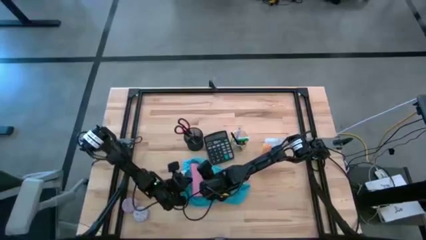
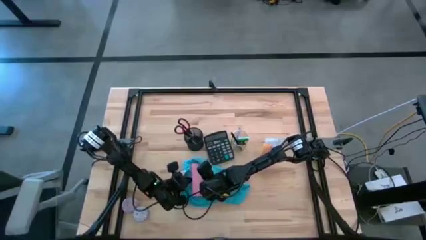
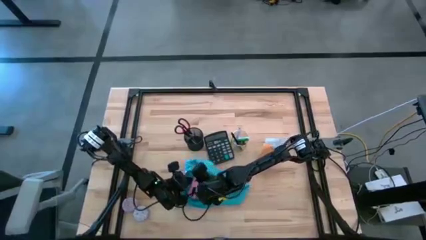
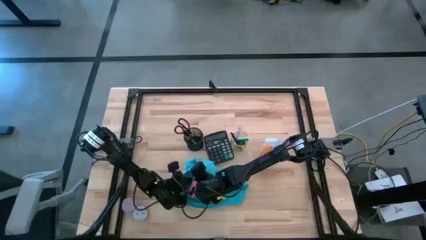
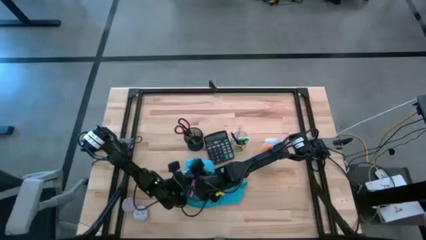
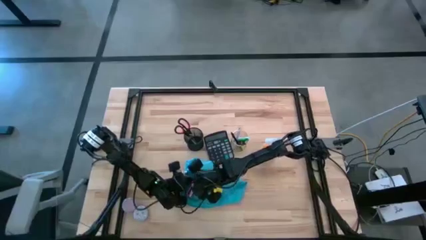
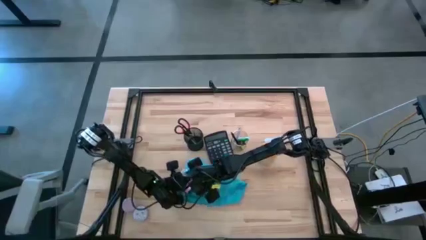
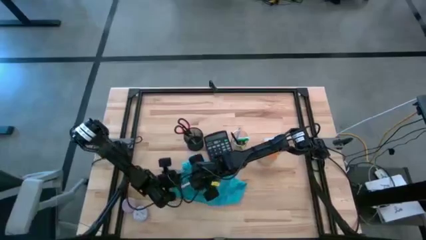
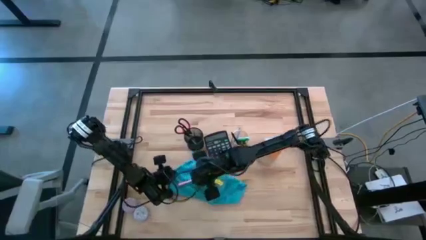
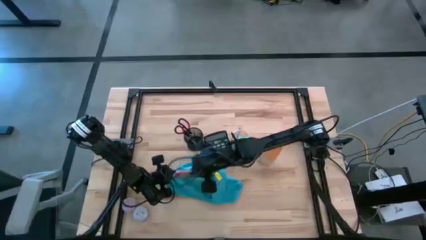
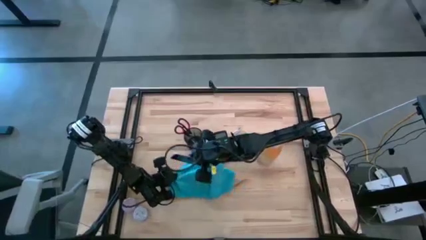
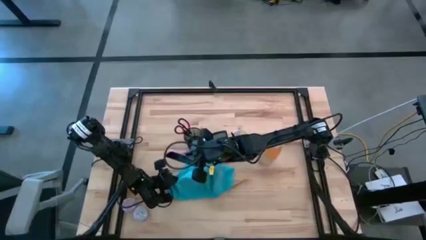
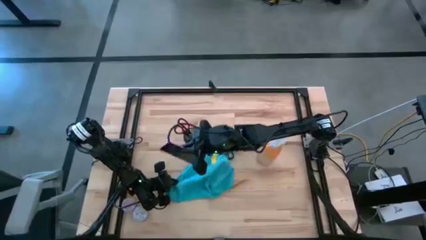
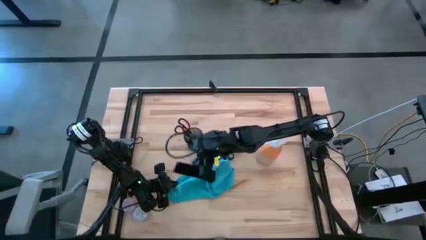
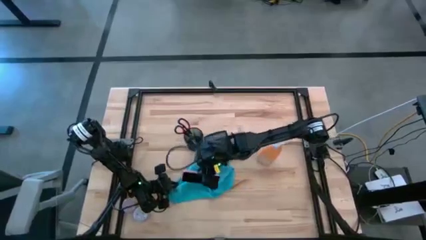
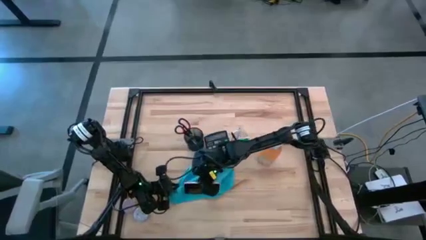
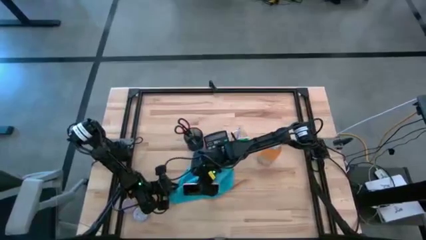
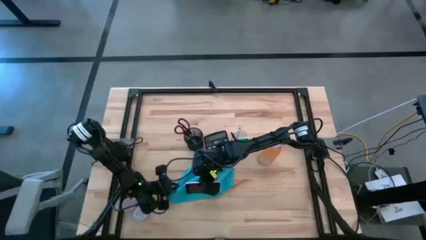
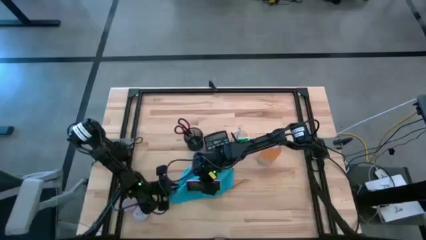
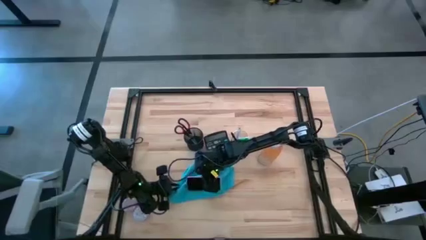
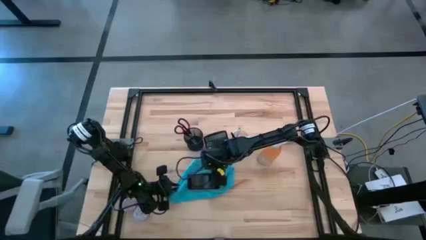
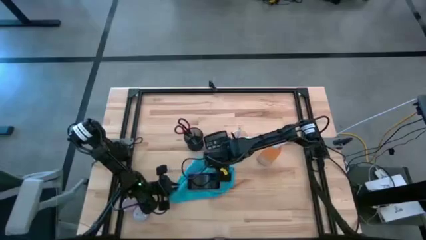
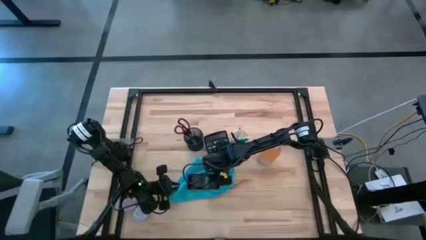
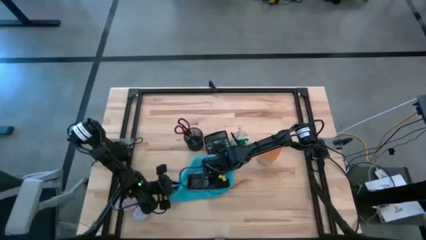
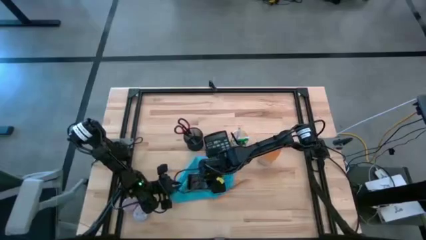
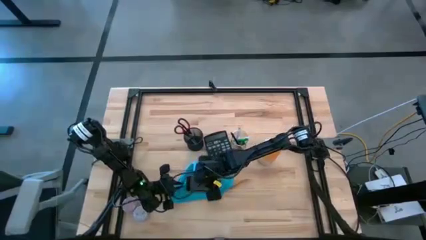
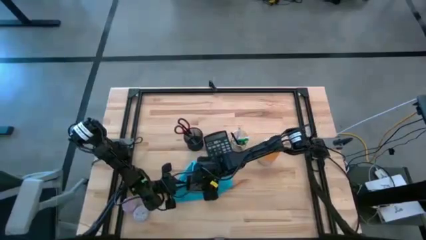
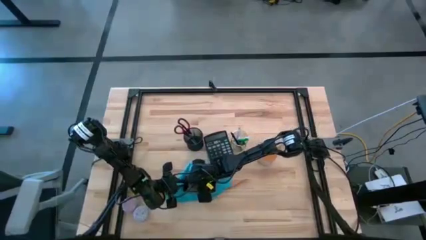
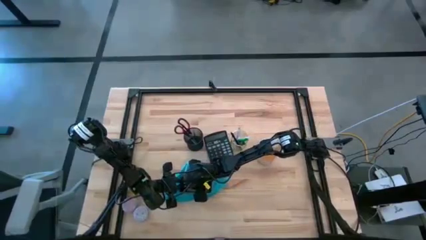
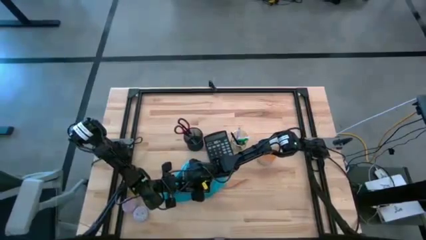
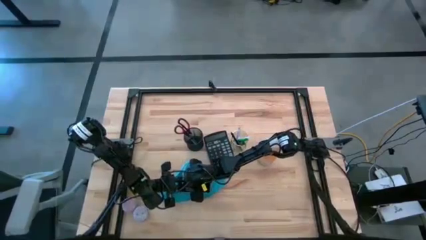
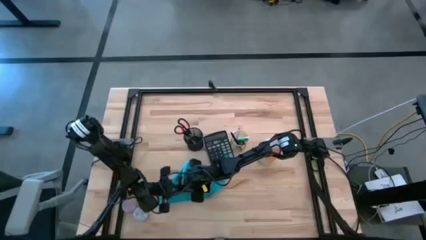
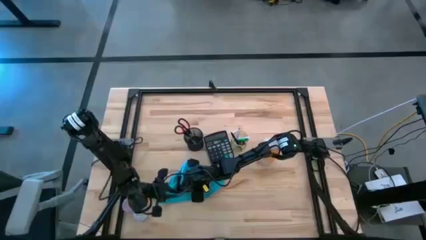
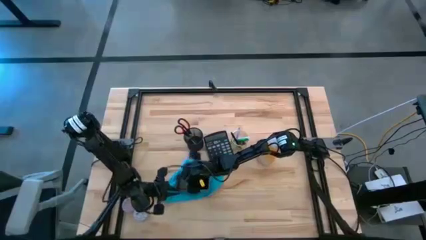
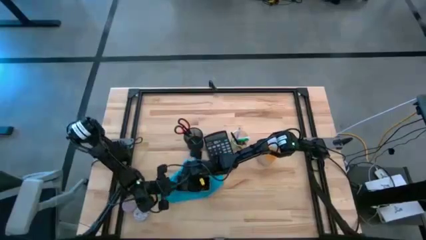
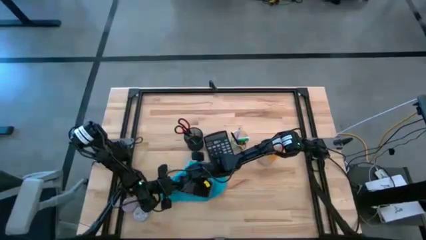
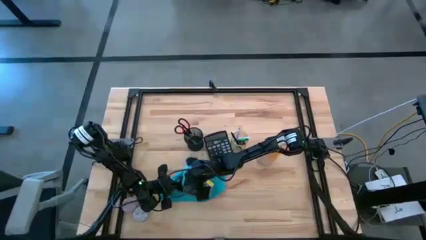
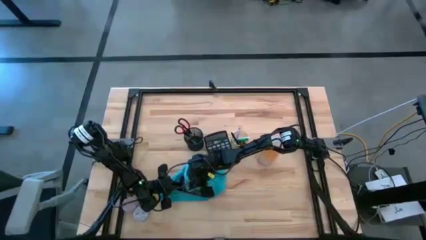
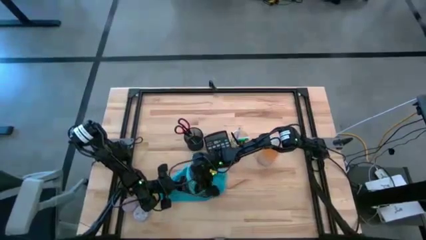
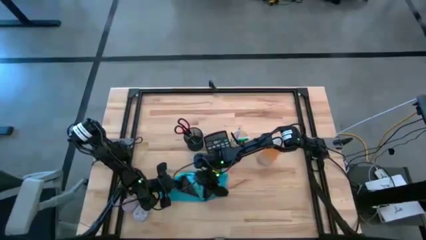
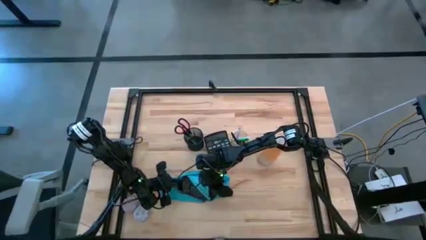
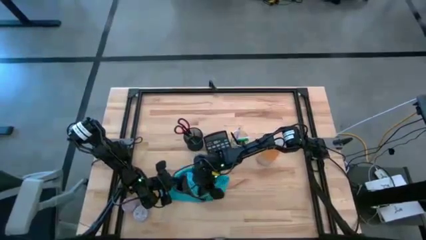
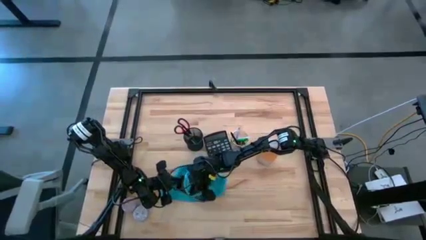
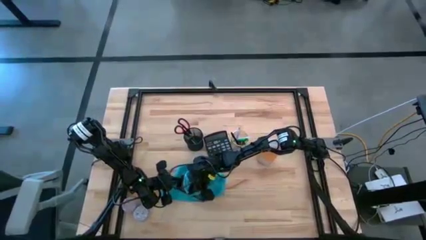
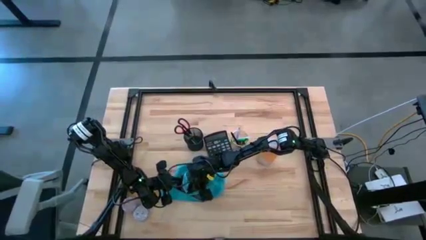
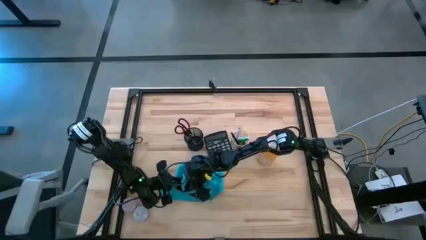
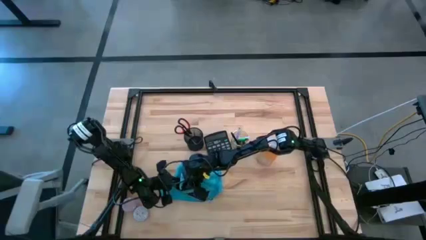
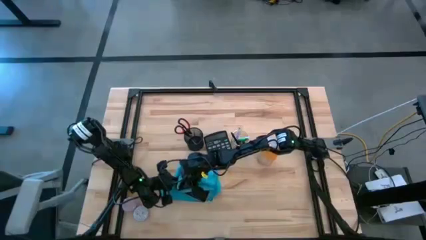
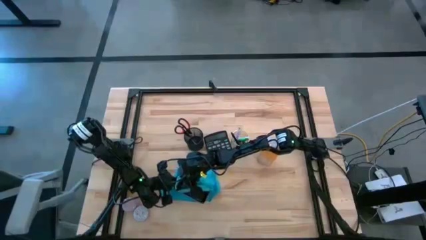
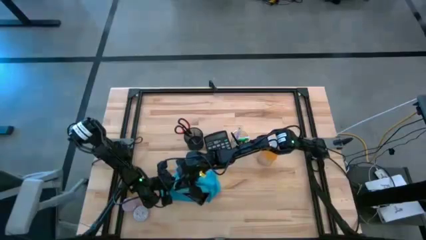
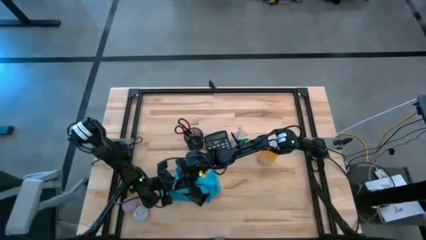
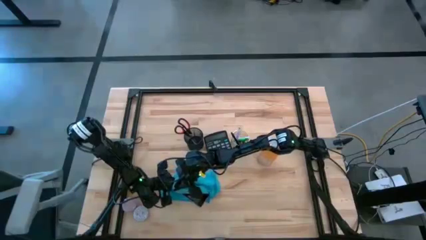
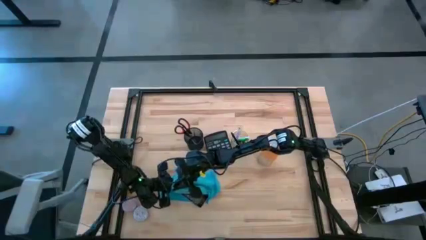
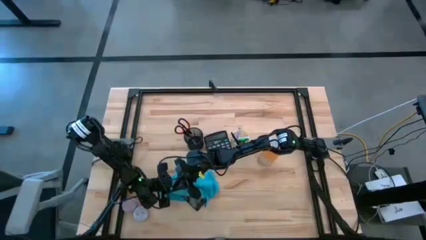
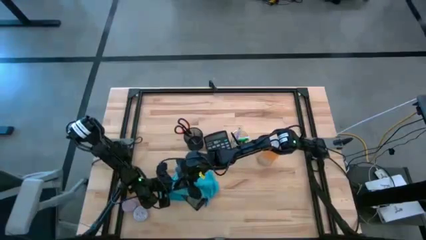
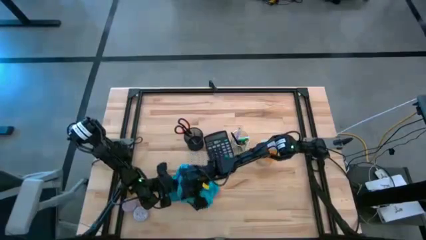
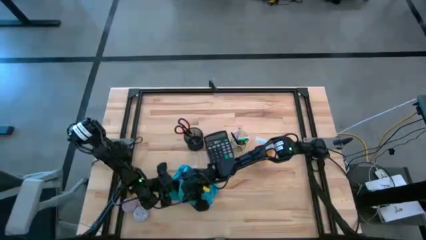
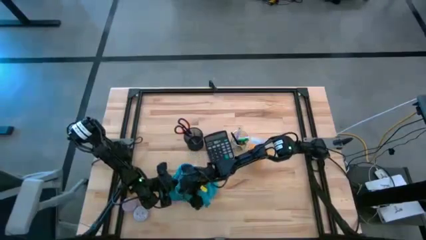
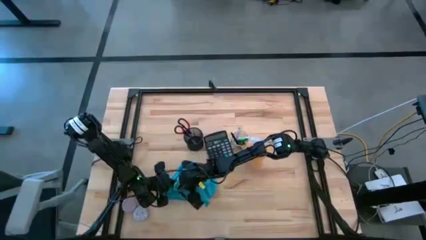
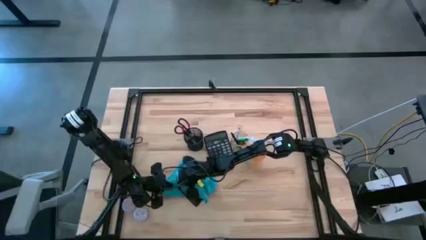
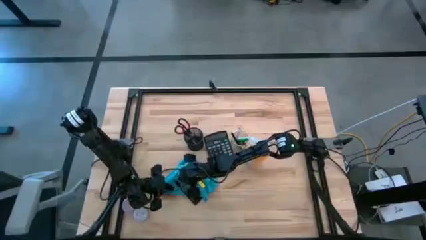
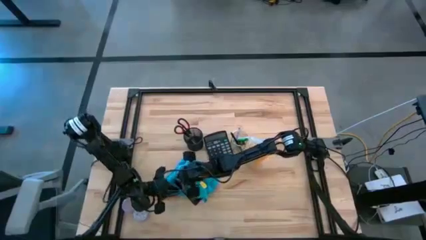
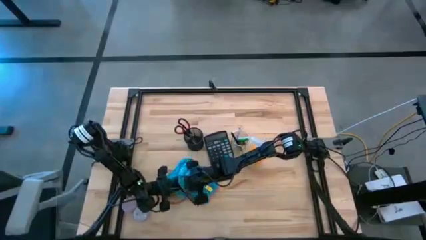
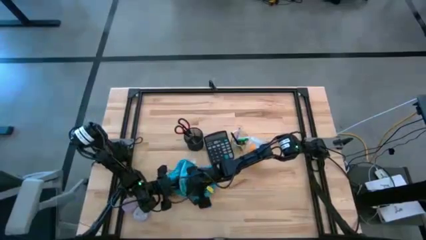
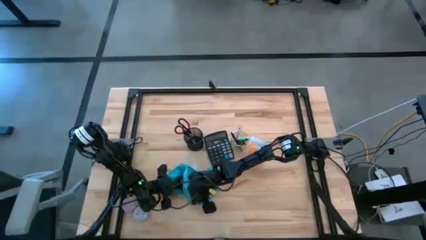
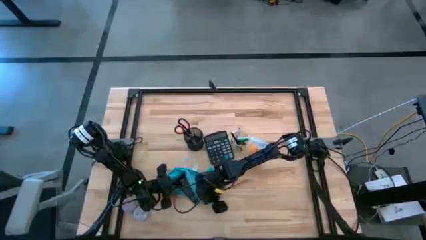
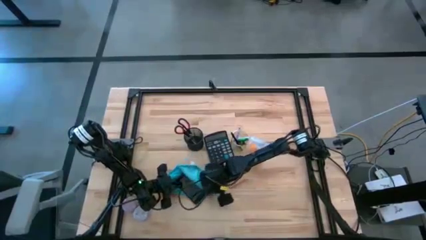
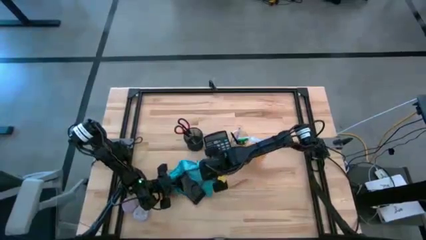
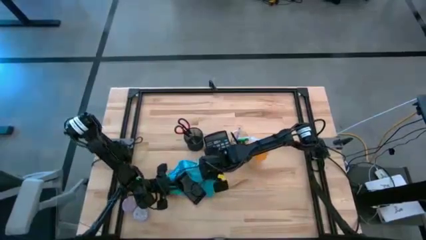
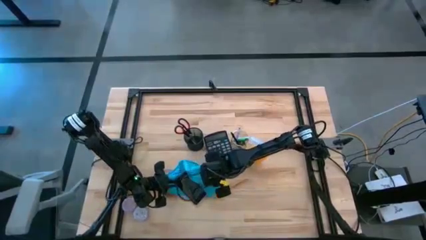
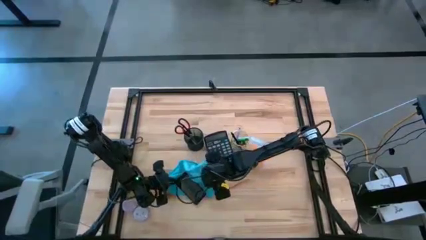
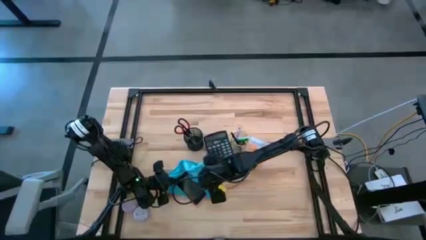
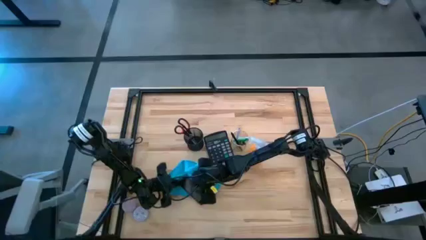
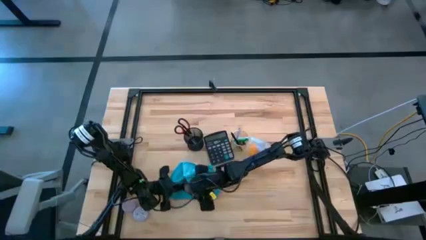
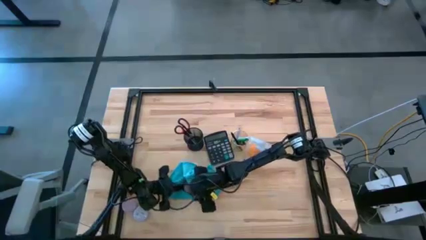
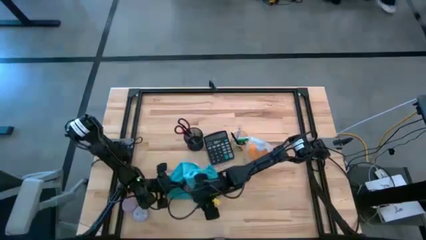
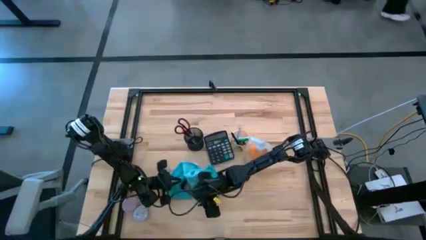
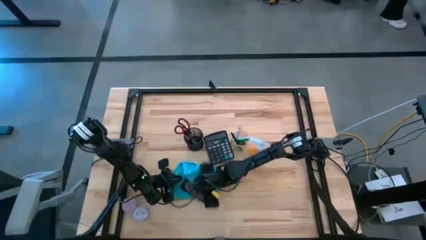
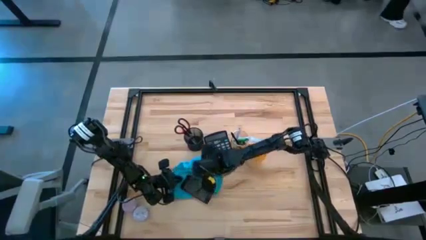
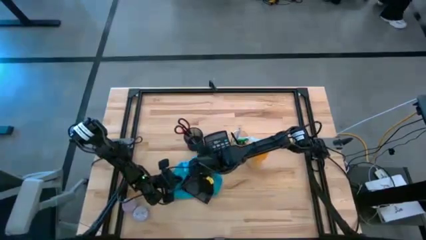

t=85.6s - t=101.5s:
Task: Apply microfiber cloth
Wipe the front and back of the cellphone with the blue microfiber cloth
